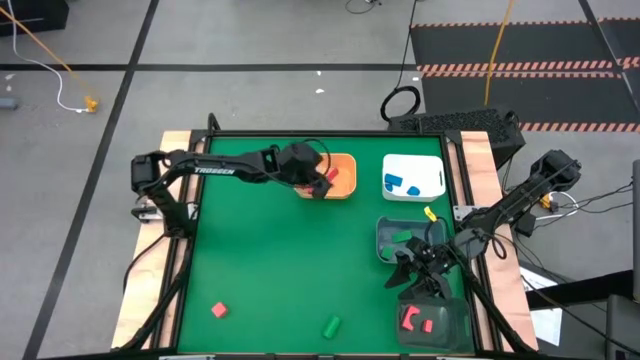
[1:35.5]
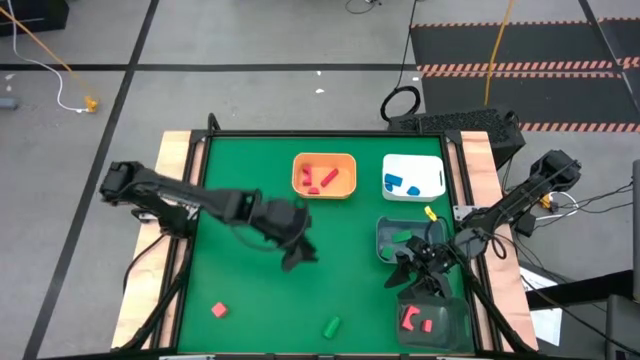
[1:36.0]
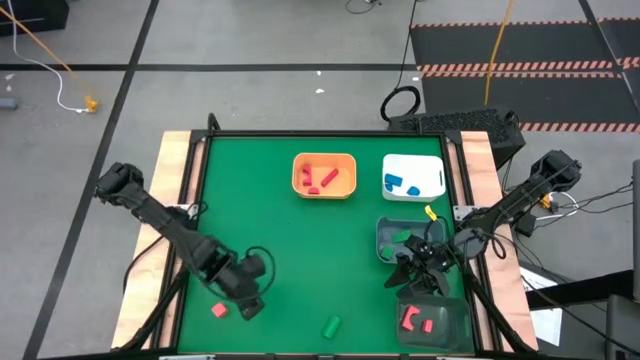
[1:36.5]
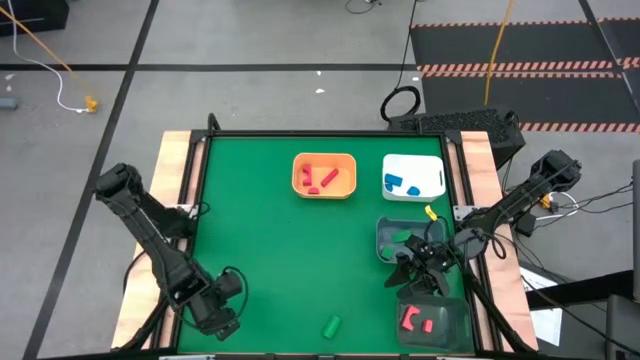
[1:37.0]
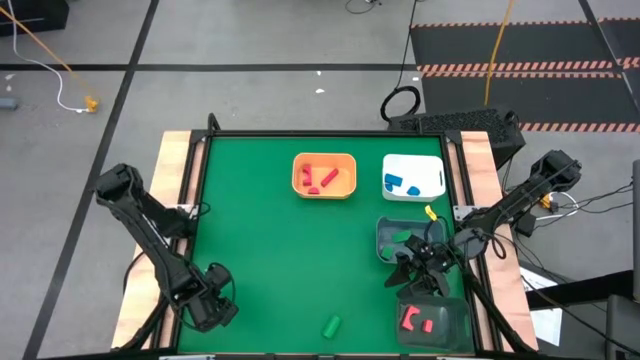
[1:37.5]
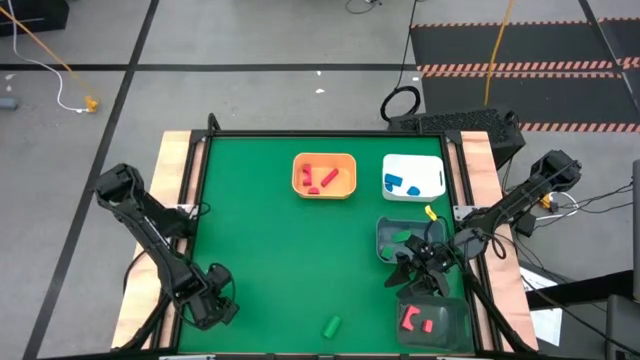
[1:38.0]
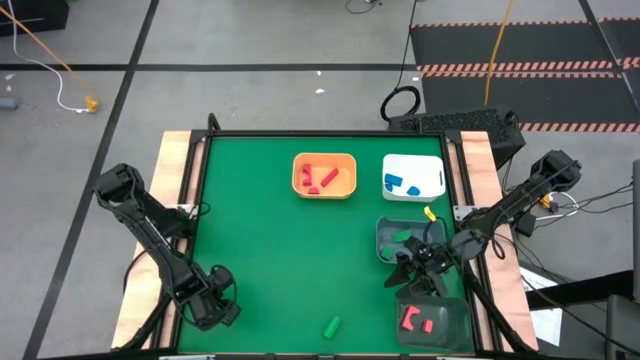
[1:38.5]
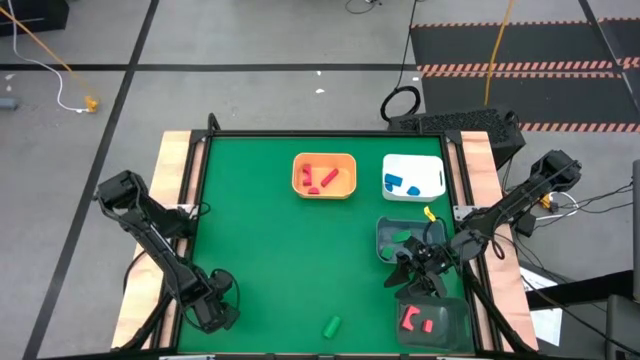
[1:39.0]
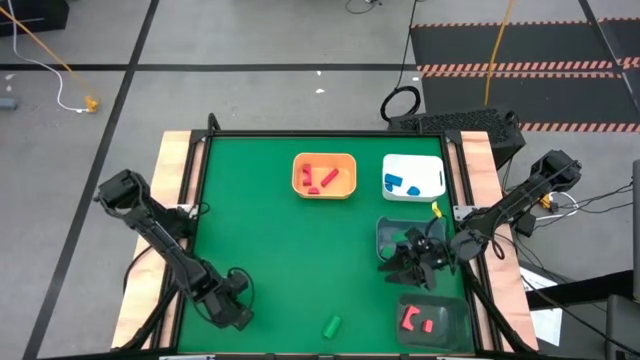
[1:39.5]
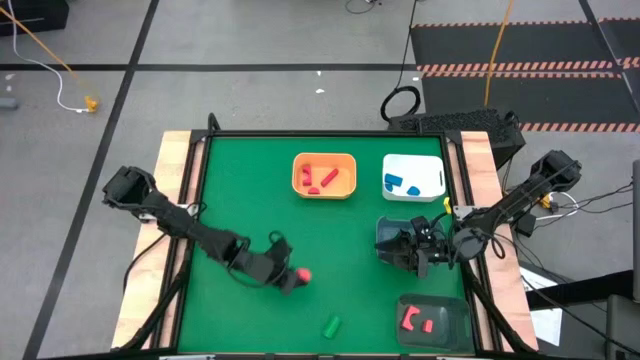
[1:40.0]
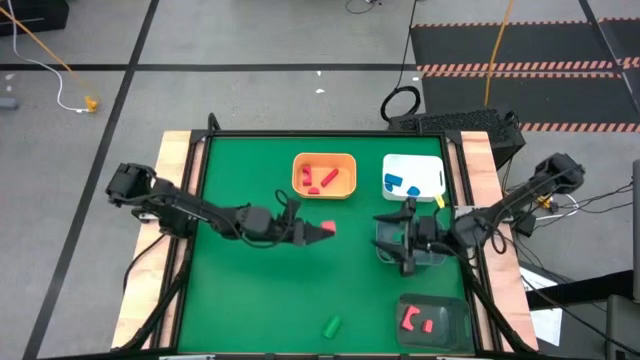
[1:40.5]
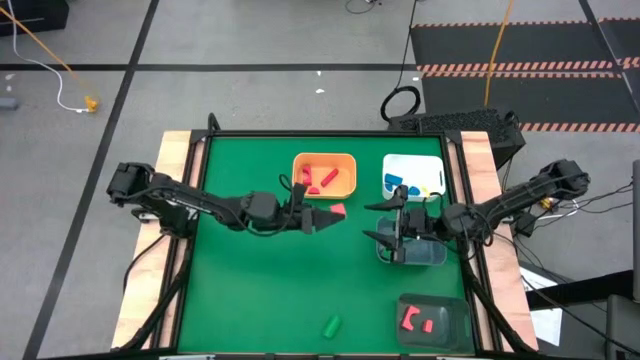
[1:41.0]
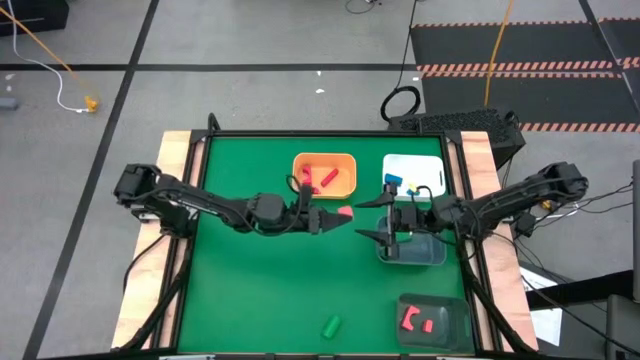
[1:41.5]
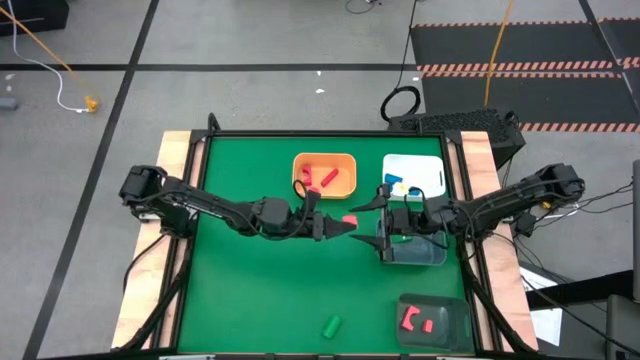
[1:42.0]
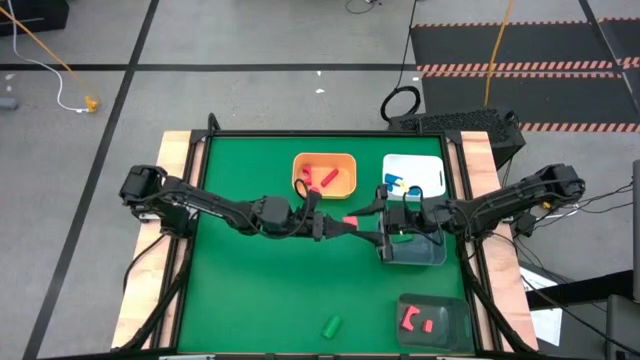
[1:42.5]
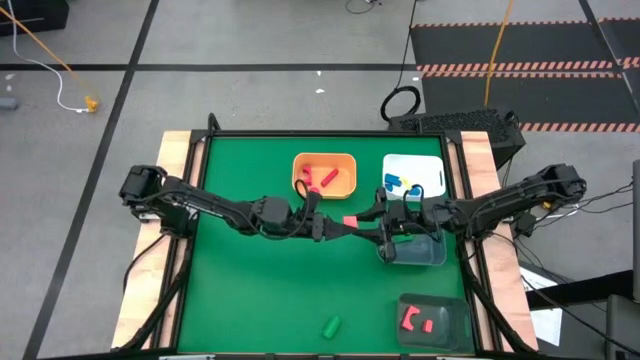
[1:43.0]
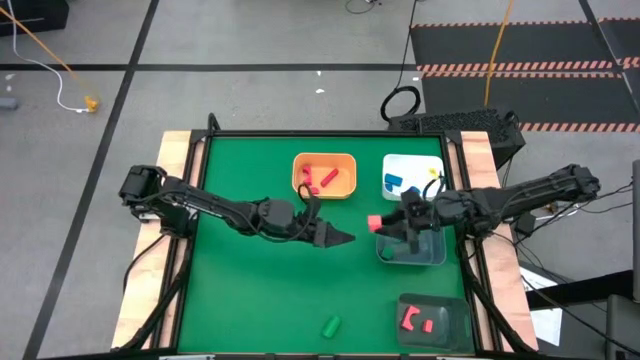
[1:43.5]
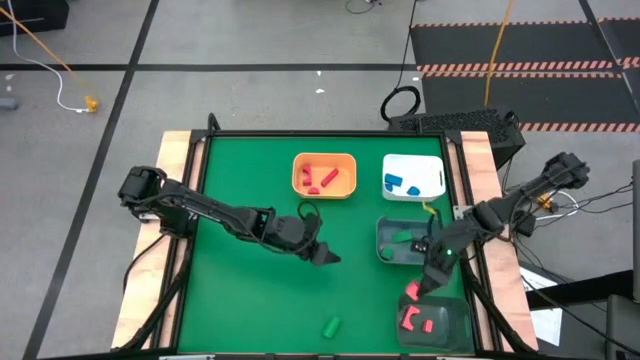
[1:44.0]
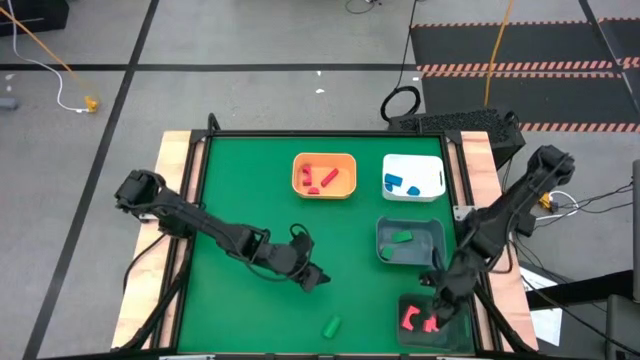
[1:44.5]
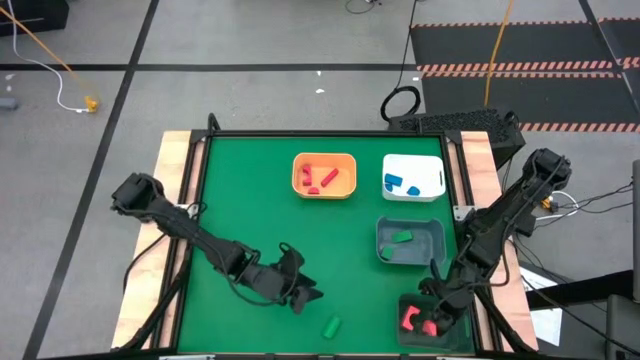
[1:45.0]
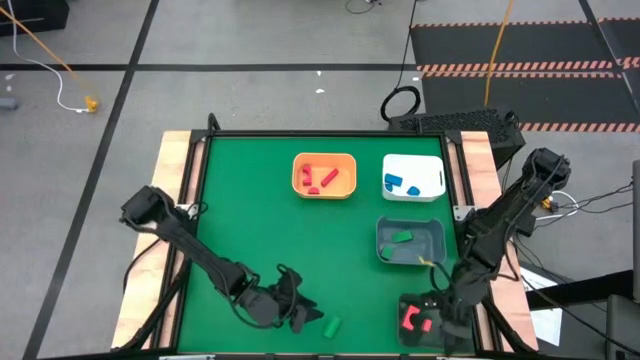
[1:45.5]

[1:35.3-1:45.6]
Task: Sort & place blocks by color
Put the orange block into the gray bin

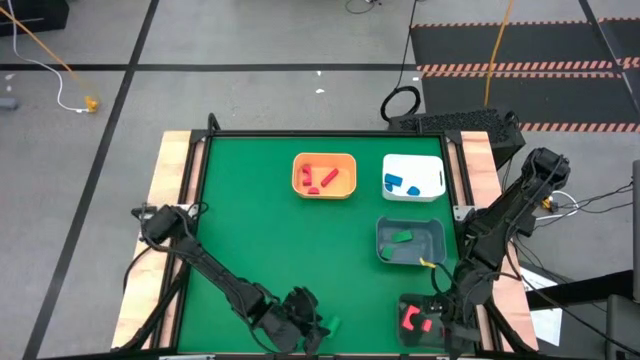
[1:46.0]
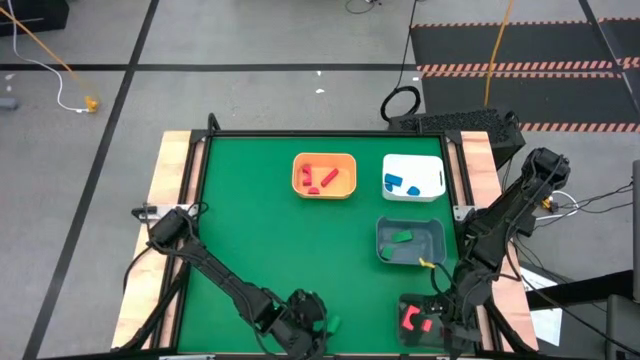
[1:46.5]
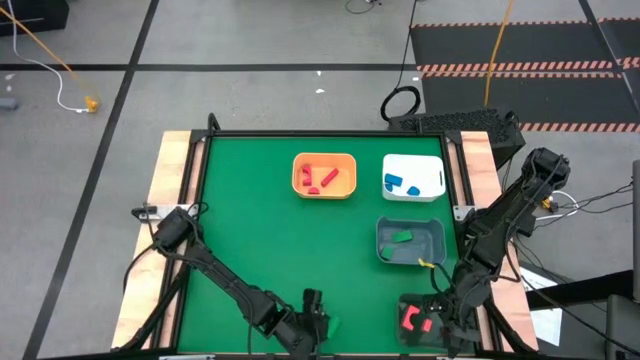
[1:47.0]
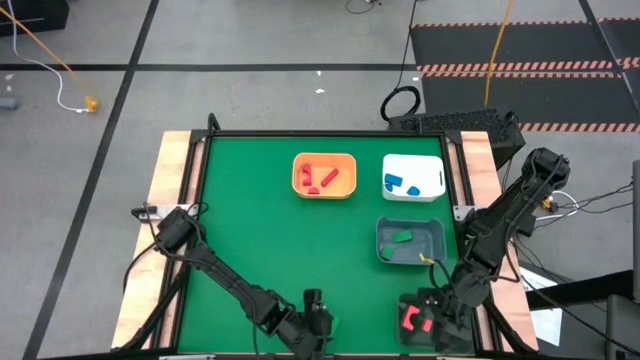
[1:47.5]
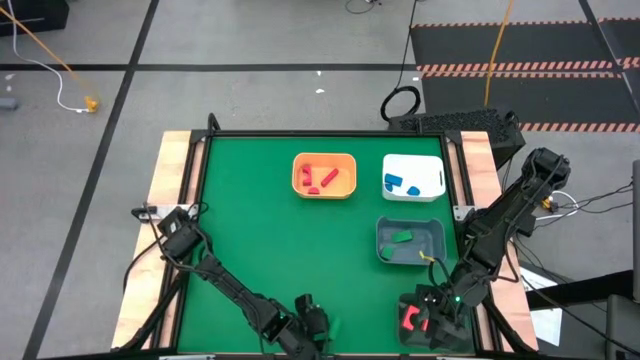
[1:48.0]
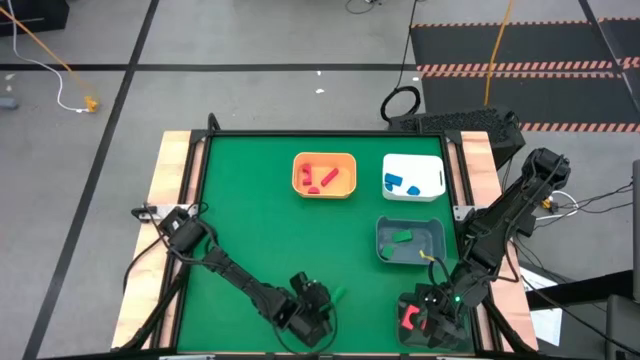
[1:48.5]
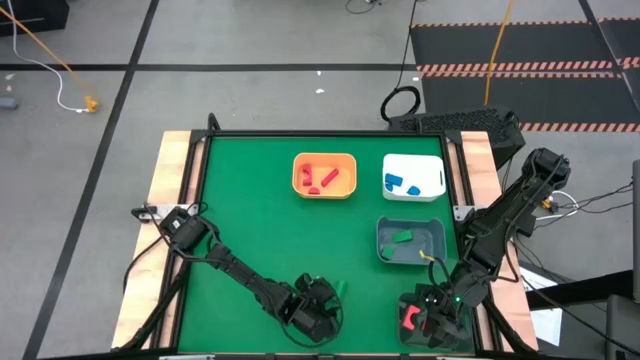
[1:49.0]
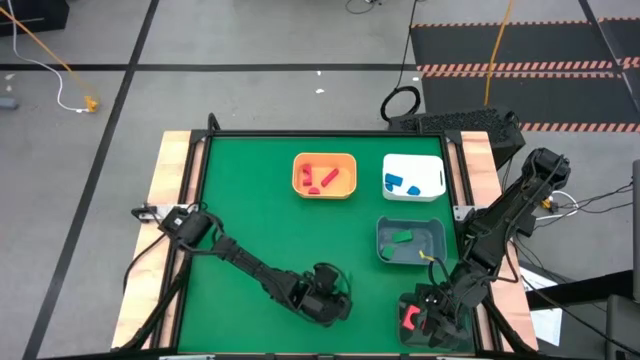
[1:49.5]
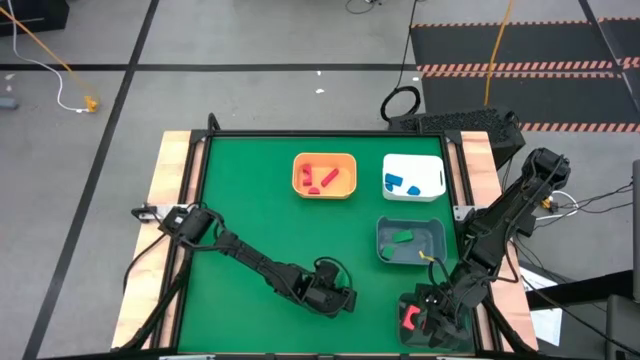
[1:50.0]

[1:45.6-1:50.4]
Put the green block into the dark blue bin

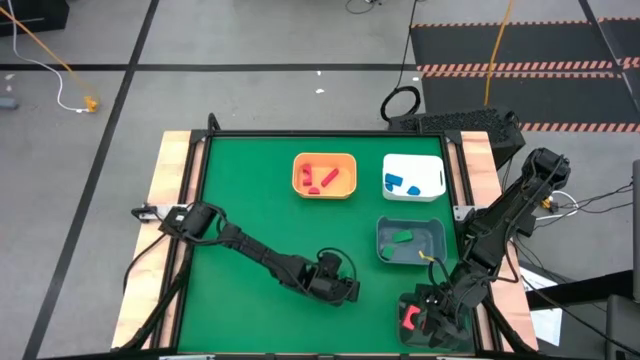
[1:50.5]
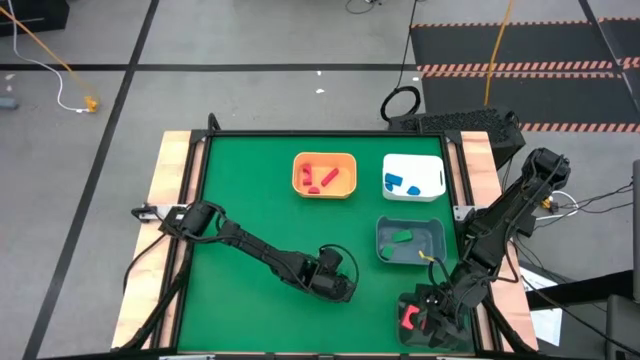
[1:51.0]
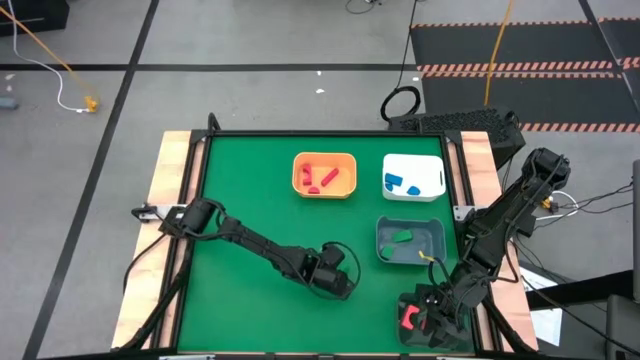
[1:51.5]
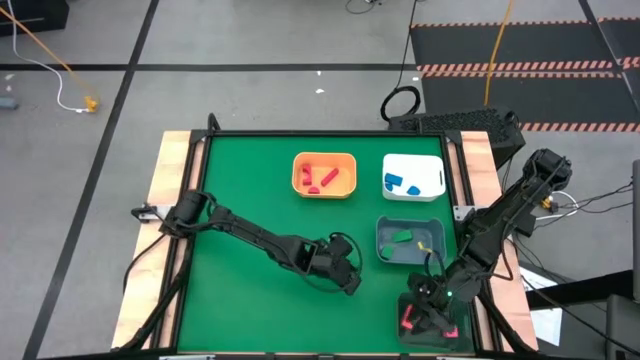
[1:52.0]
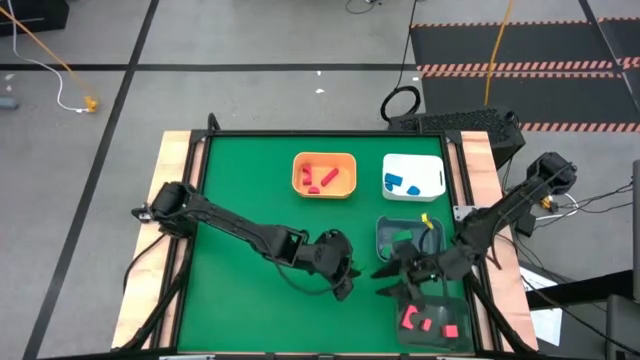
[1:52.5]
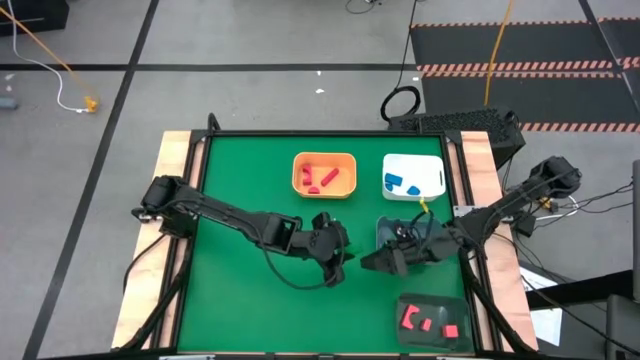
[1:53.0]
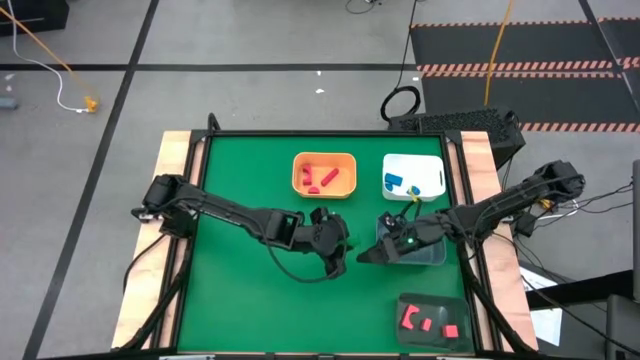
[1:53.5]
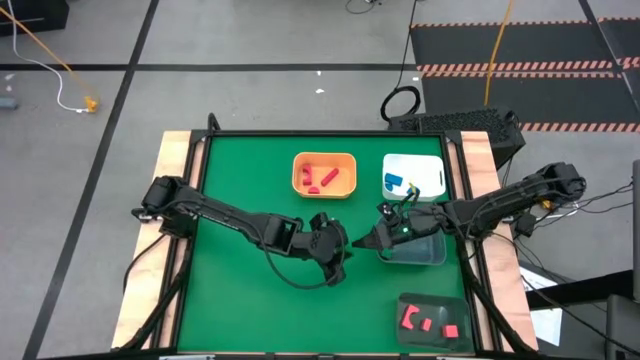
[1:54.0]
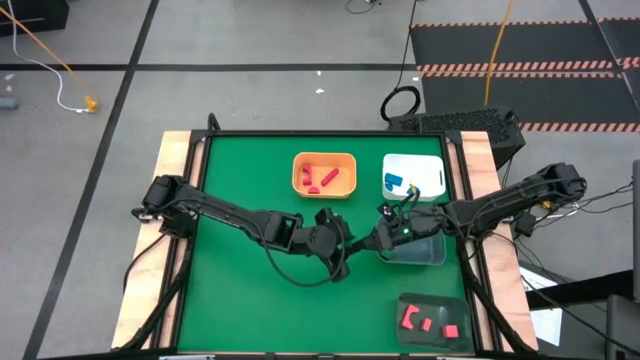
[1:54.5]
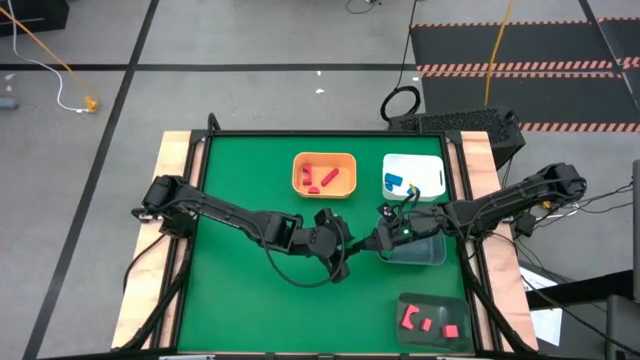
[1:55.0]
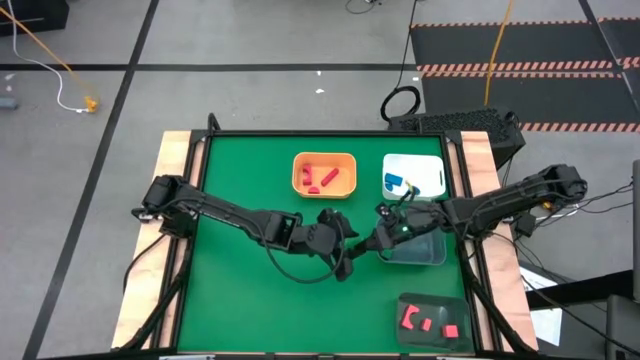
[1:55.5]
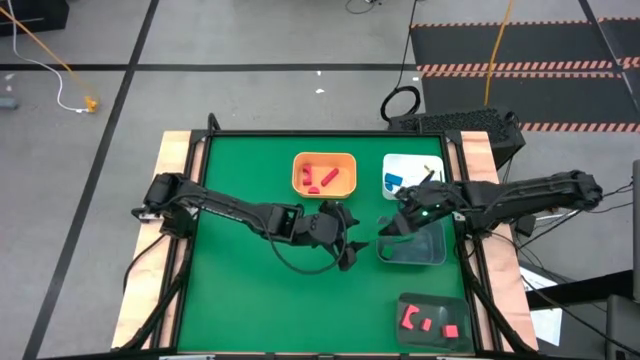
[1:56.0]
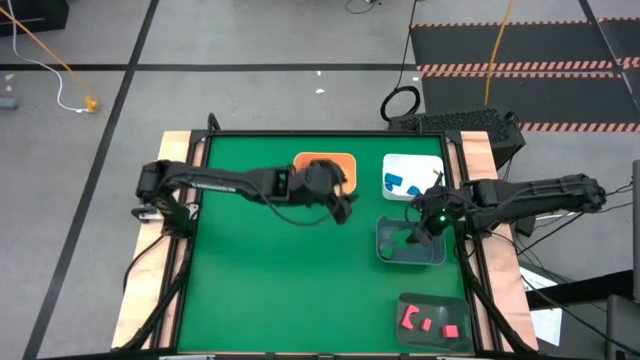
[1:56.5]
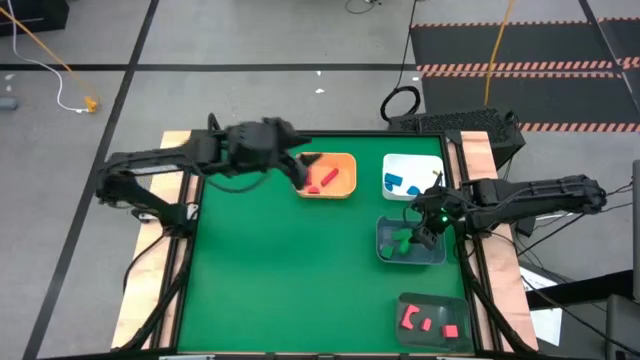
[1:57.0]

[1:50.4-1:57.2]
Put the green block into the dark blue bin
